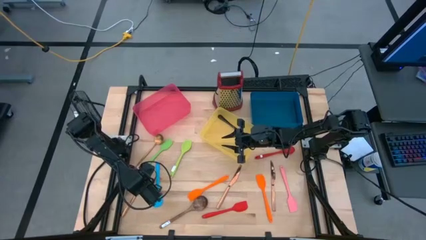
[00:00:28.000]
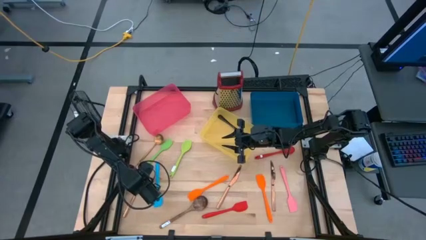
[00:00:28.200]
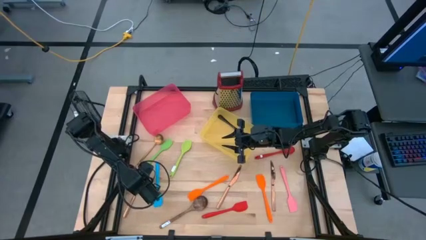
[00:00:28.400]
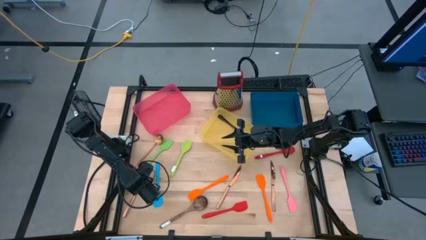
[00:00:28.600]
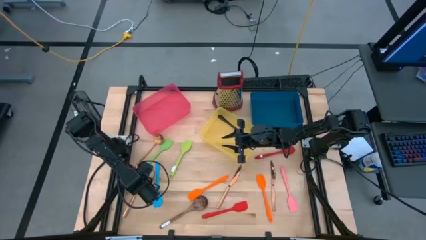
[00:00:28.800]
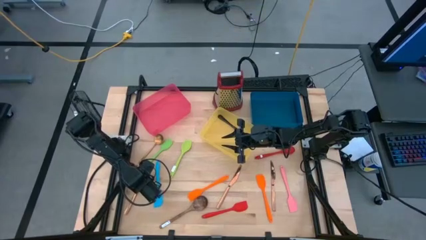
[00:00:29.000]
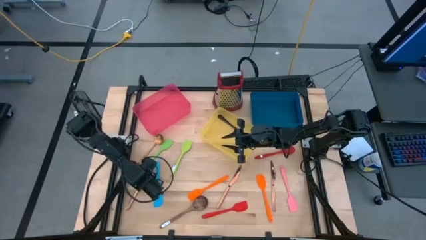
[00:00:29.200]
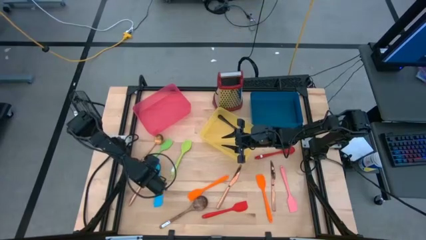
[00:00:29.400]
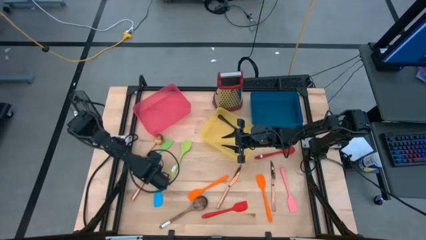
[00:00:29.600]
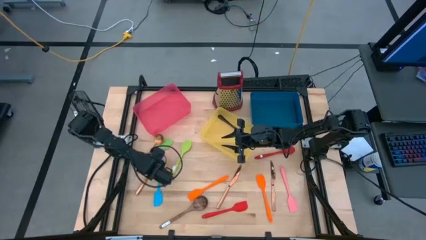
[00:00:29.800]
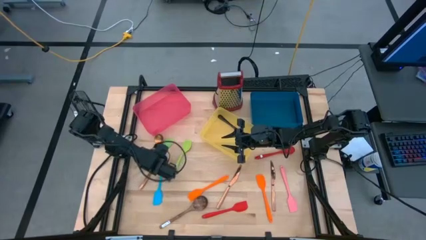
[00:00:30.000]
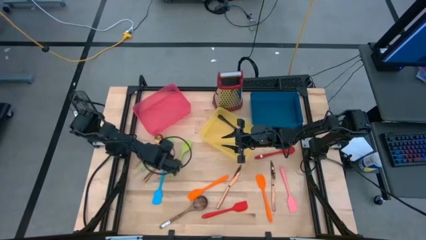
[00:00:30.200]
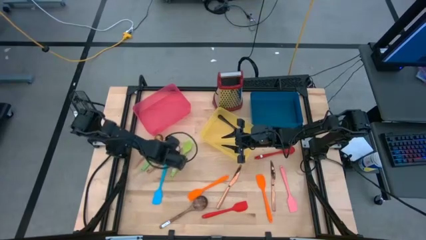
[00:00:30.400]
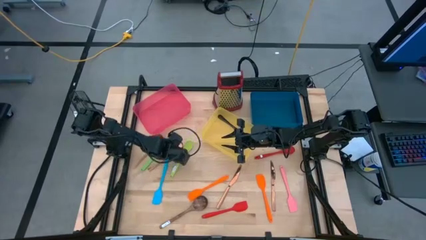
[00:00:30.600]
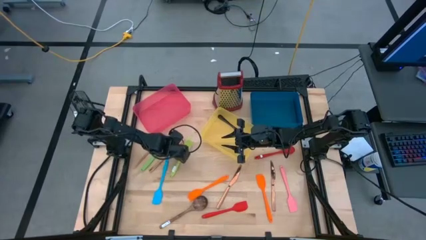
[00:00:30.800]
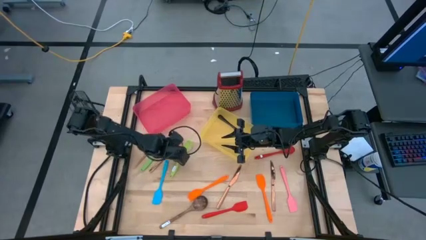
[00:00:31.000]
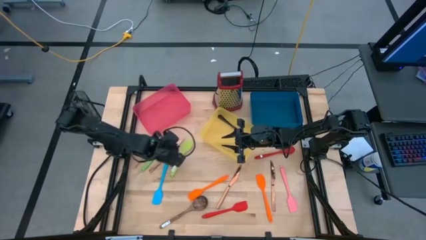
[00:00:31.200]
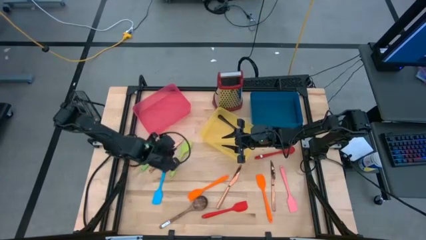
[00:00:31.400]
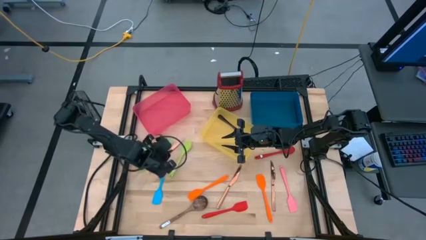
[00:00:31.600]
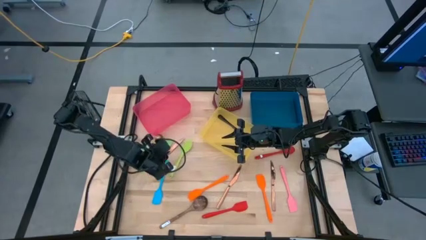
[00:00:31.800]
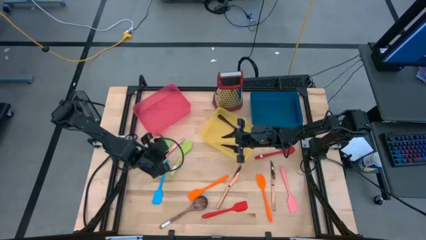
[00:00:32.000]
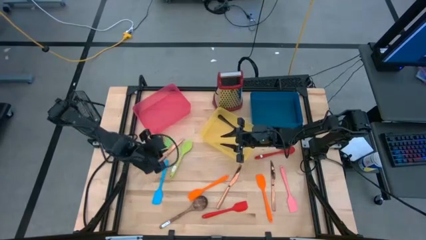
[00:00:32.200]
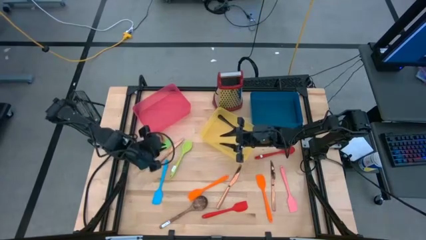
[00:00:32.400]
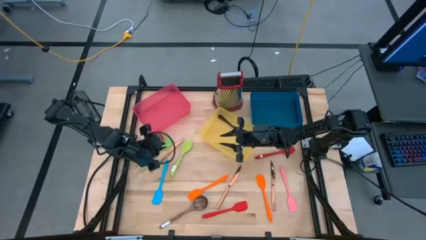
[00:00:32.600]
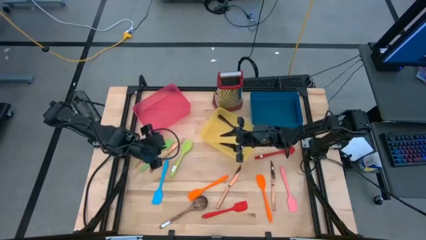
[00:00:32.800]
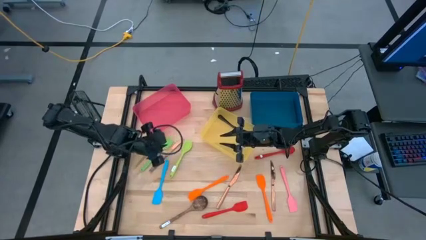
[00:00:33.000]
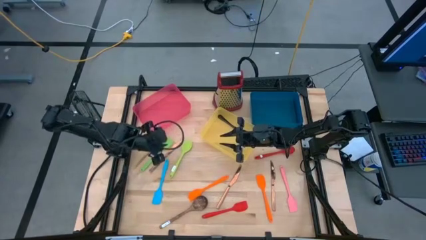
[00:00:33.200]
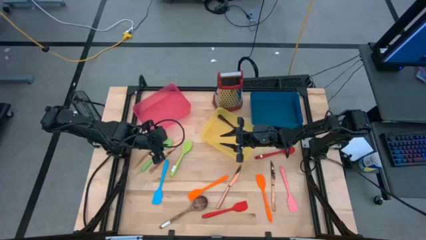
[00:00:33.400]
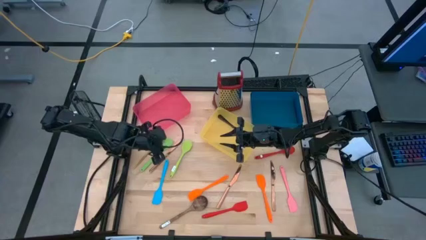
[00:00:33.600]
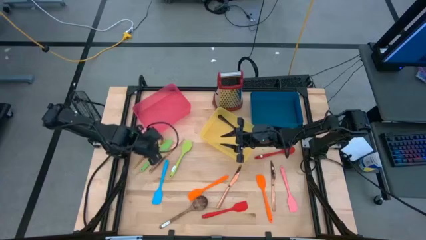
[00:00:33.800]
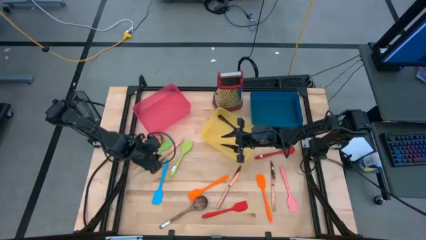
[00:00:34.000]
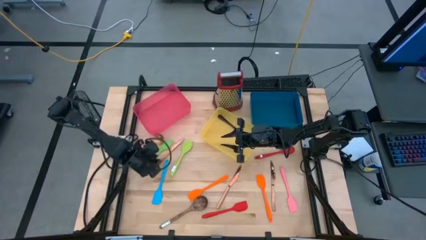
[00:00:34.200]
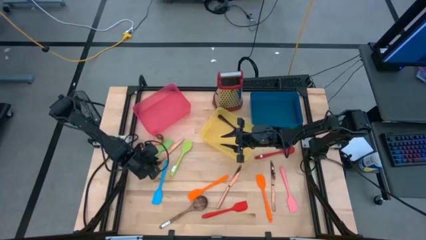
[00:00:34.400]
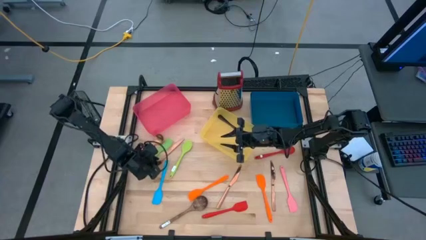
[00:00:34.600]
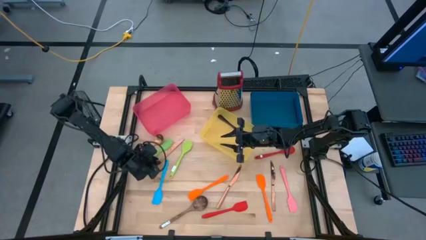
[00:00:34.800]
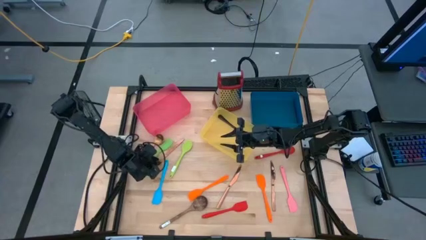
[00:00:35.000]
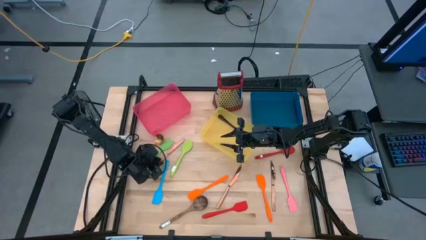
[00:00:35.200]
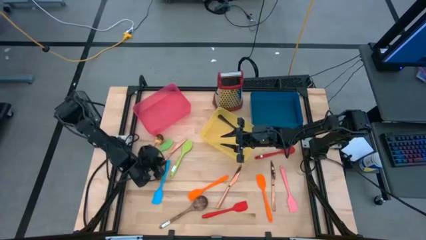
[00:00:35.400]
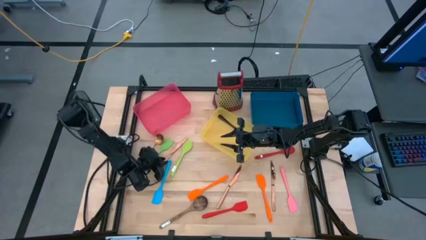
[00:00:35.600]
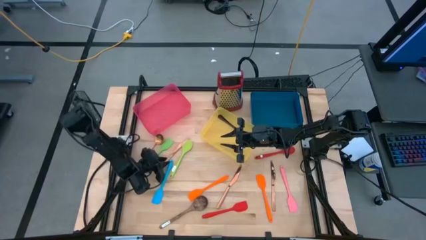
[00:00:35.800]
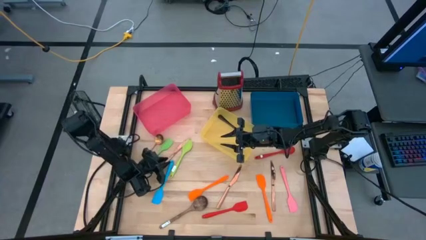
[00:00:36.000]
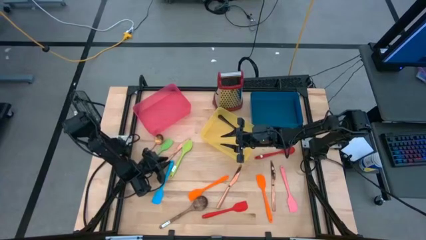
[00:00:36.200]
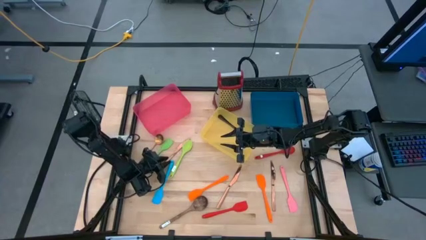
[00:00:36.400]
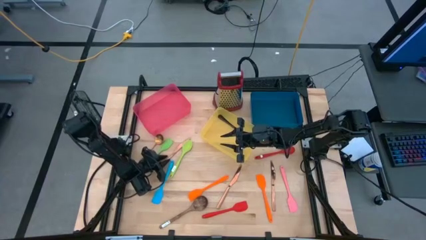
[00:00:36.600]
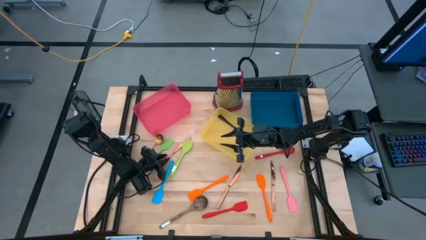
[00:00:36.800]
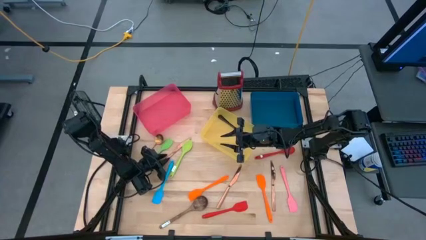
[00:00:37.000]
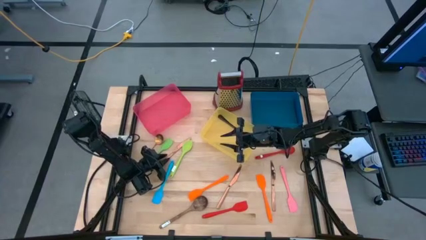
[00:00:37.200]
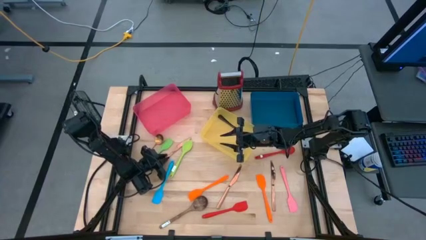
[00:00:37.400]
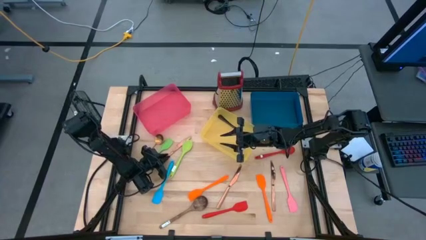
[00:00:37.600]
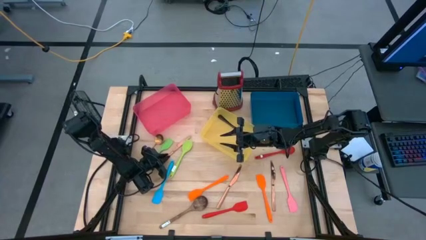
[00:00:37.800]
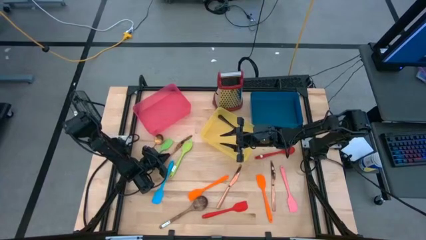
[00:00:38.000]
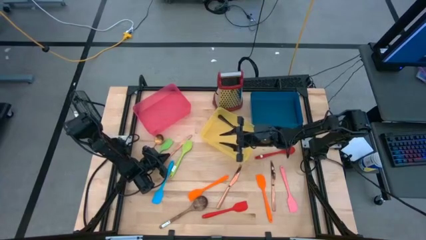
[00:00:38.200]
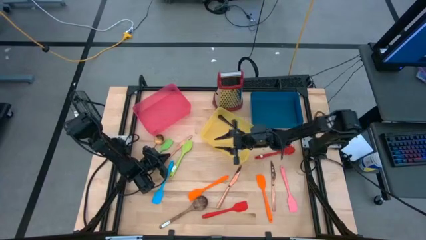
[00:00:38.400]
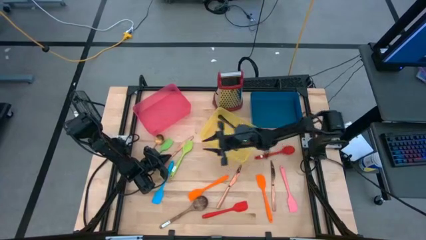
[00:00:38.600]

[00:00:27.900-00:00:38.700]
Task: Pick & Place Kitchen Items
Put the brown table knife into the yellow bin
